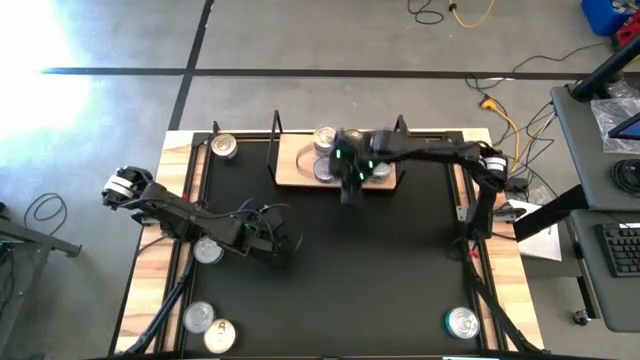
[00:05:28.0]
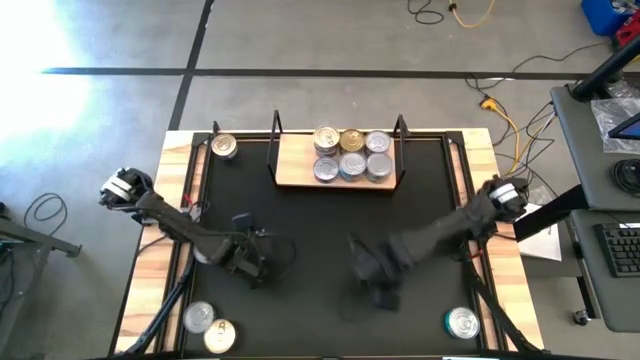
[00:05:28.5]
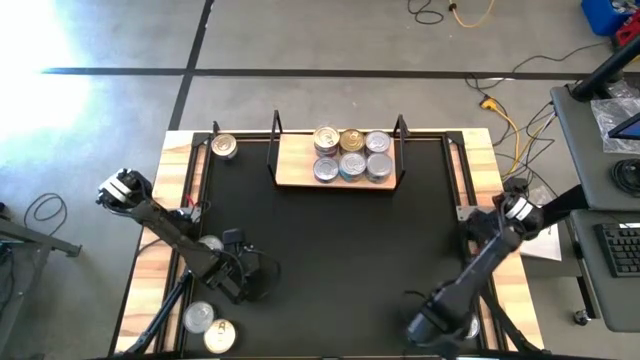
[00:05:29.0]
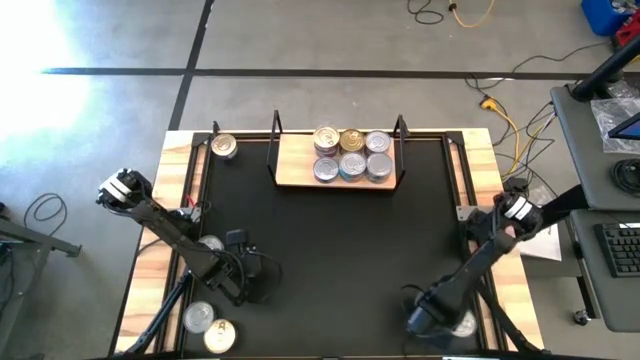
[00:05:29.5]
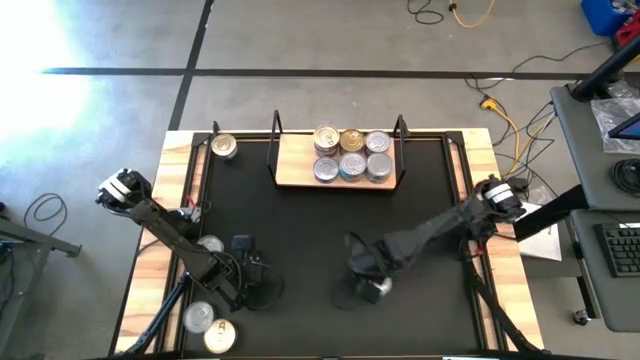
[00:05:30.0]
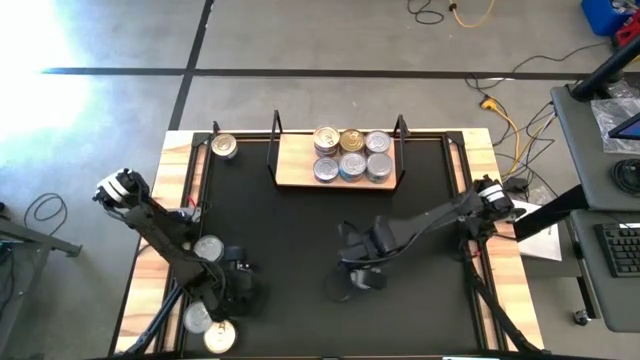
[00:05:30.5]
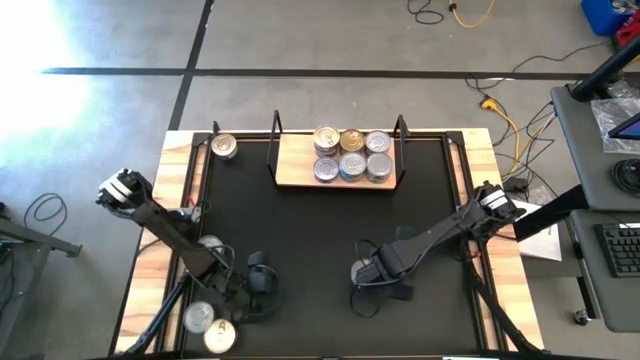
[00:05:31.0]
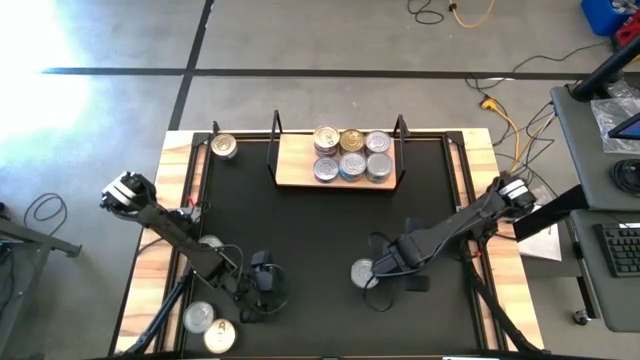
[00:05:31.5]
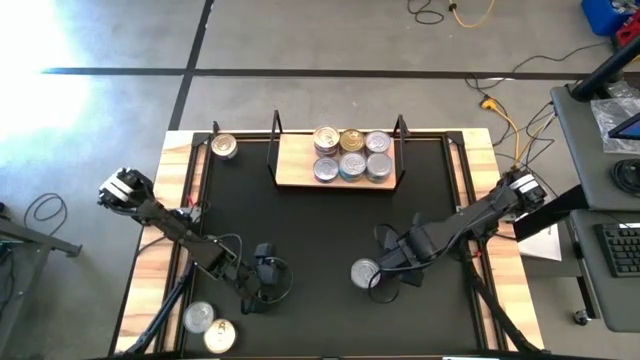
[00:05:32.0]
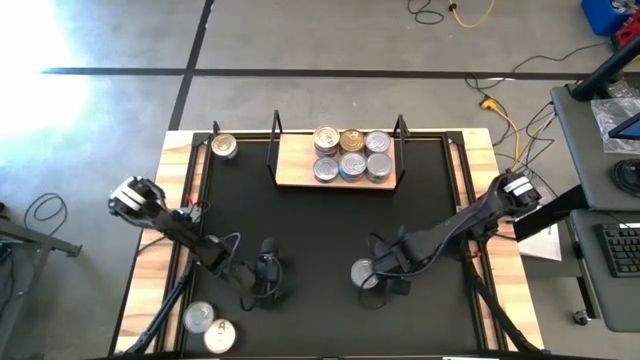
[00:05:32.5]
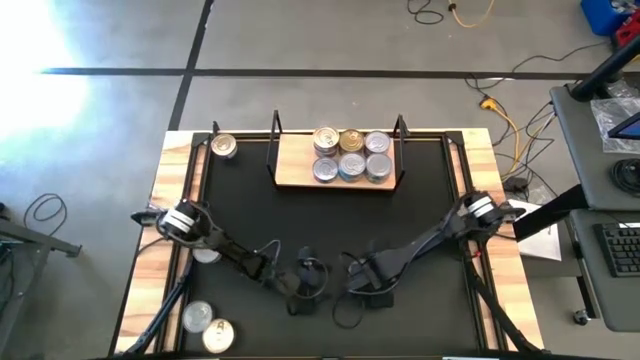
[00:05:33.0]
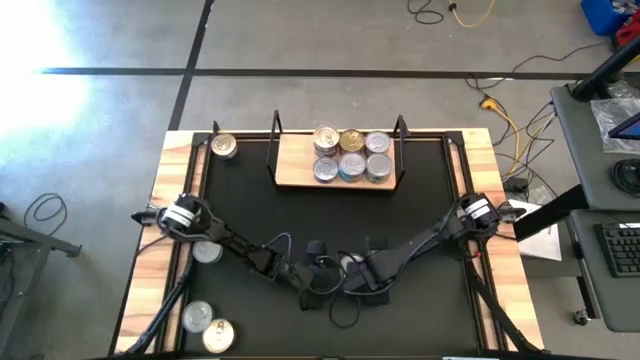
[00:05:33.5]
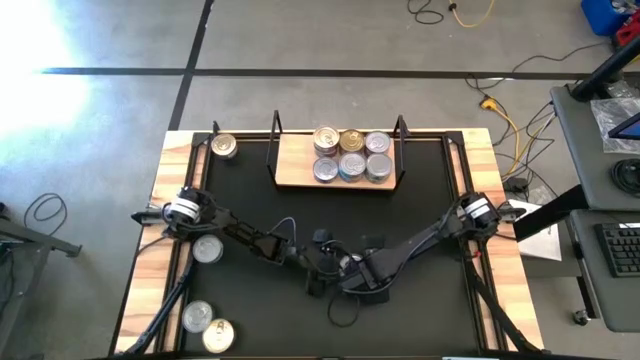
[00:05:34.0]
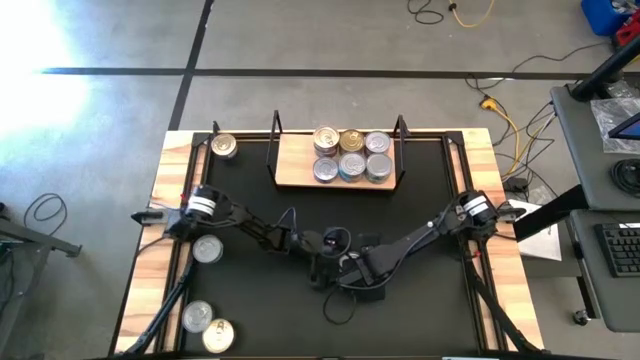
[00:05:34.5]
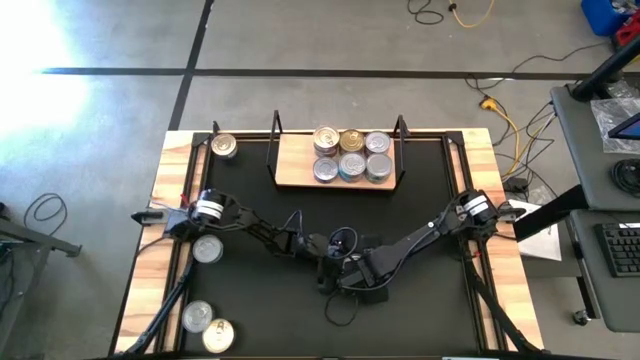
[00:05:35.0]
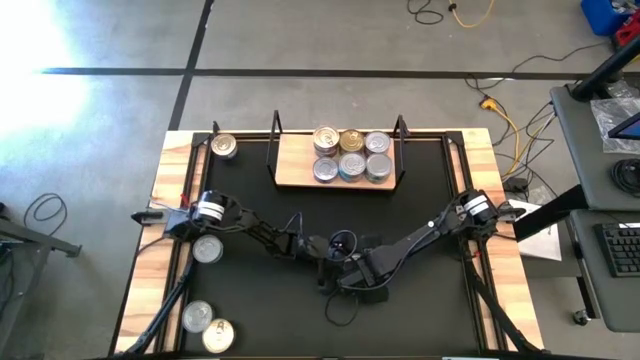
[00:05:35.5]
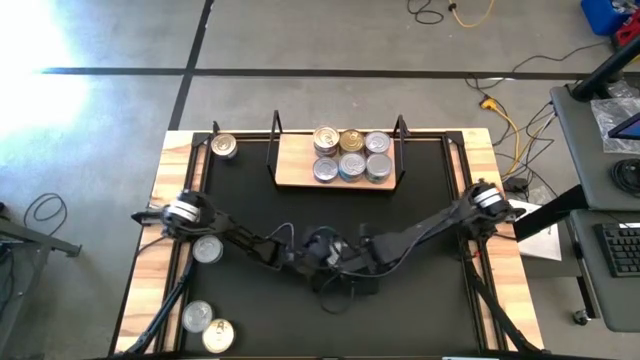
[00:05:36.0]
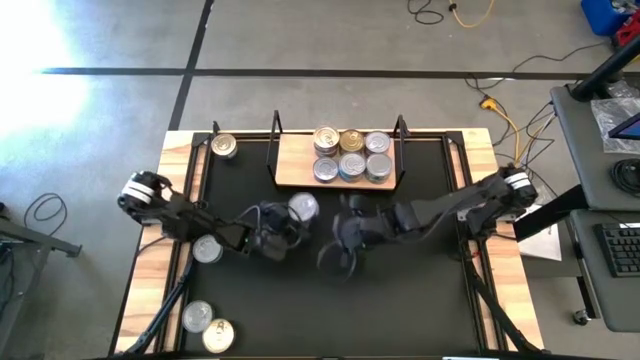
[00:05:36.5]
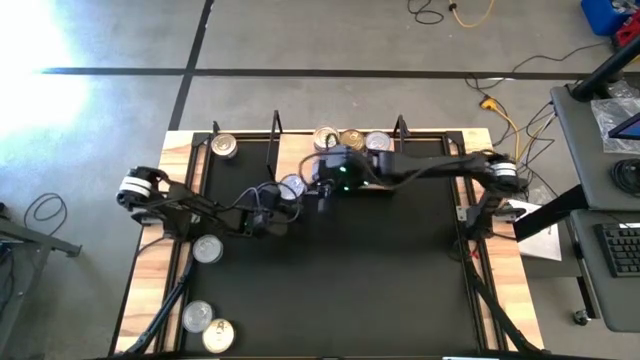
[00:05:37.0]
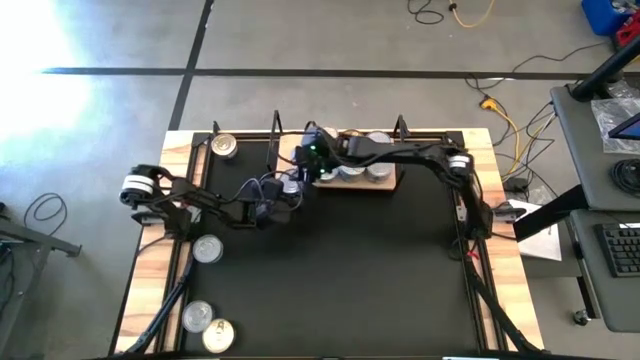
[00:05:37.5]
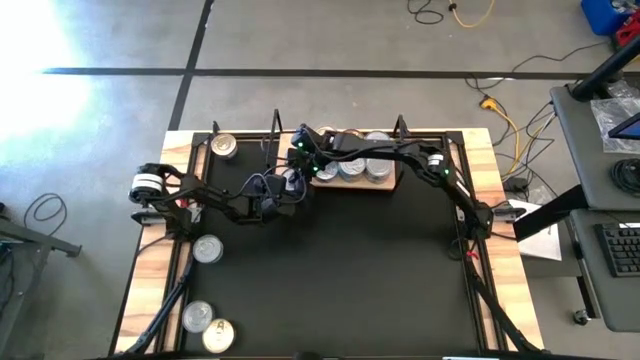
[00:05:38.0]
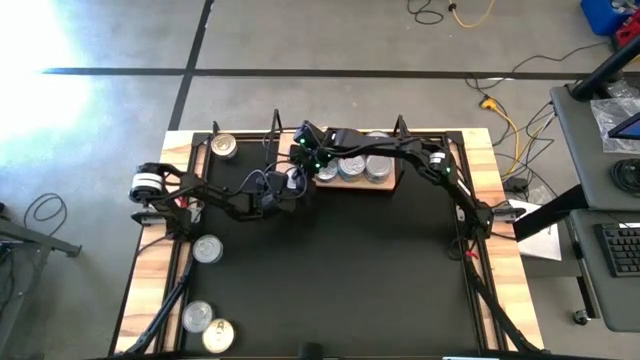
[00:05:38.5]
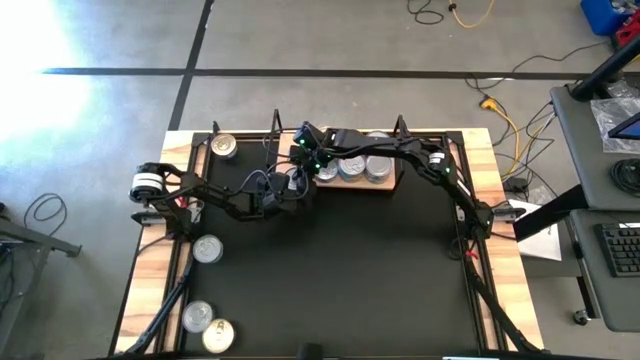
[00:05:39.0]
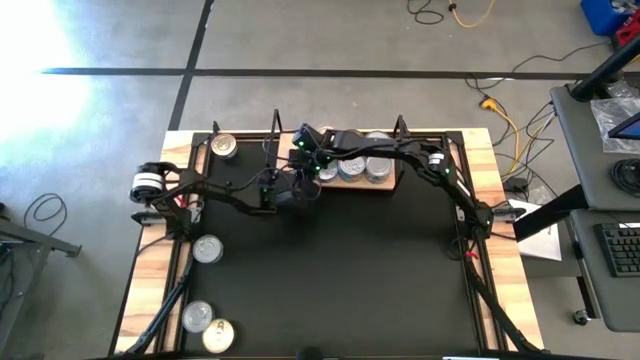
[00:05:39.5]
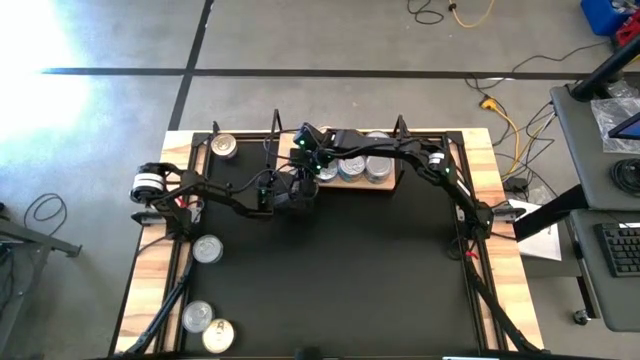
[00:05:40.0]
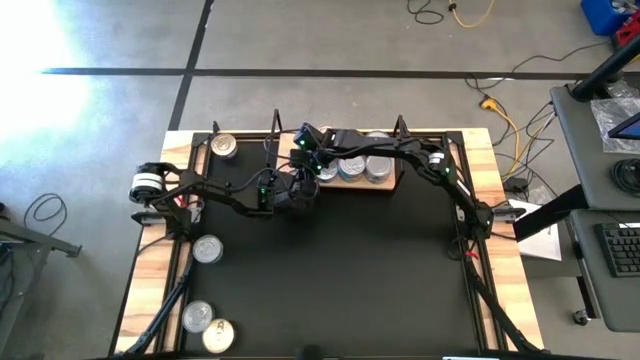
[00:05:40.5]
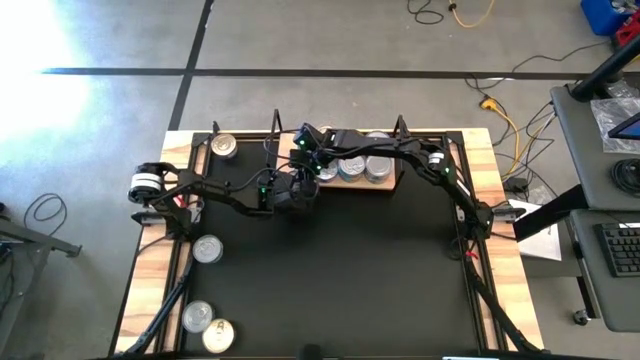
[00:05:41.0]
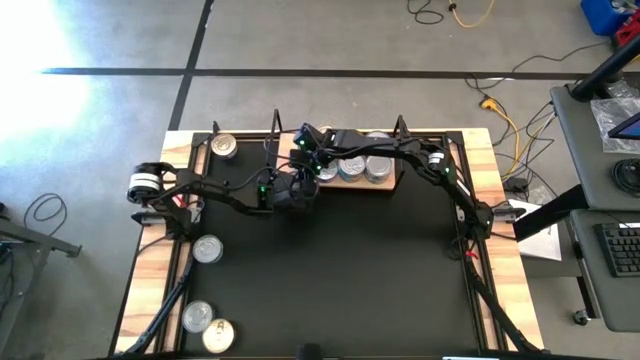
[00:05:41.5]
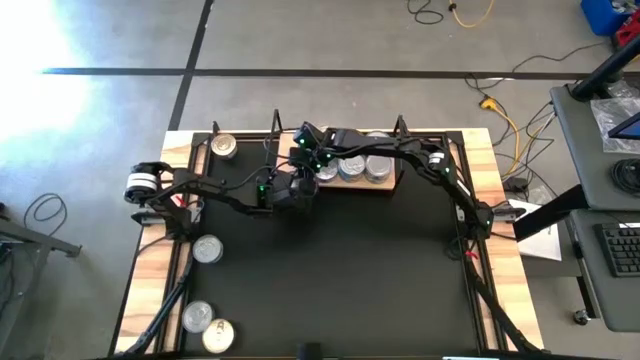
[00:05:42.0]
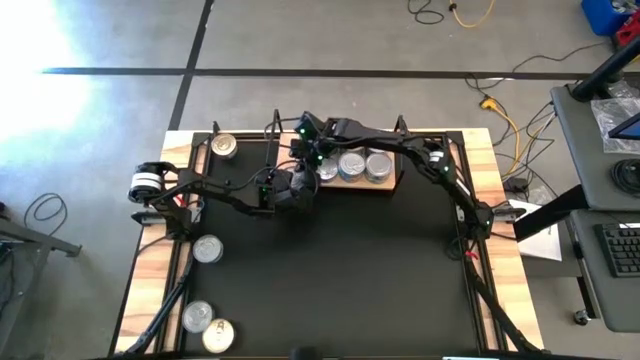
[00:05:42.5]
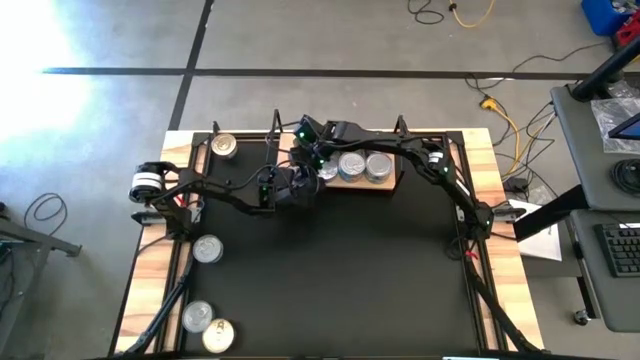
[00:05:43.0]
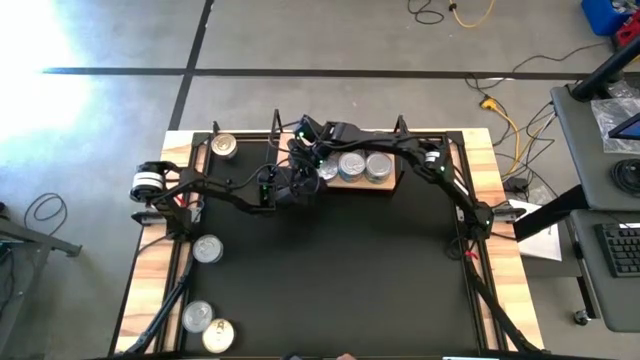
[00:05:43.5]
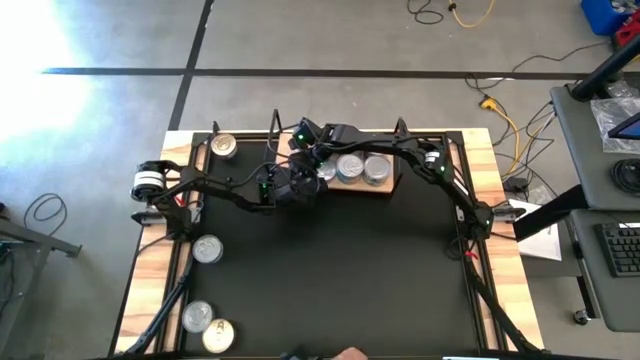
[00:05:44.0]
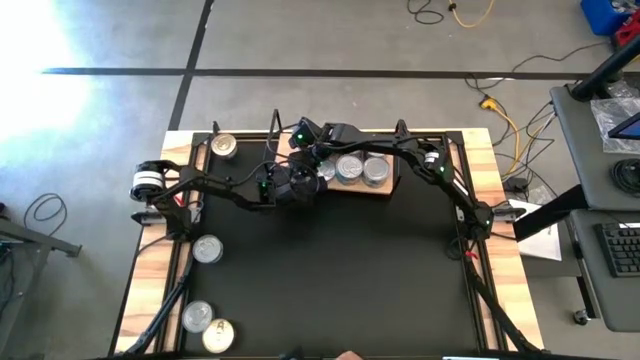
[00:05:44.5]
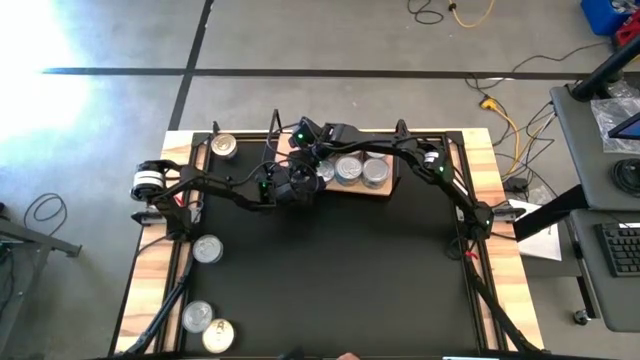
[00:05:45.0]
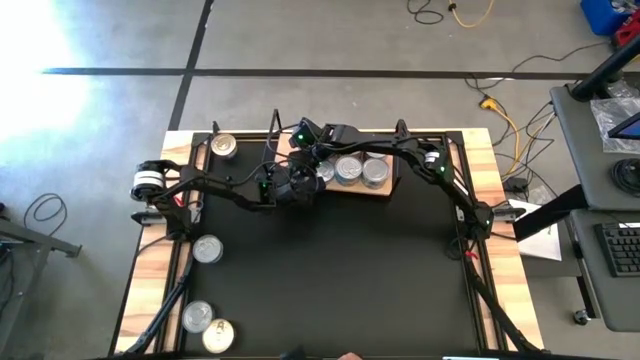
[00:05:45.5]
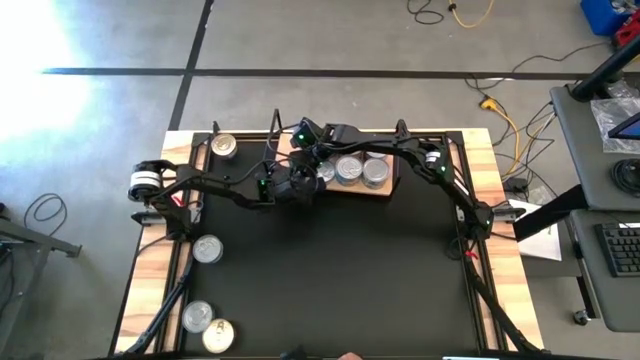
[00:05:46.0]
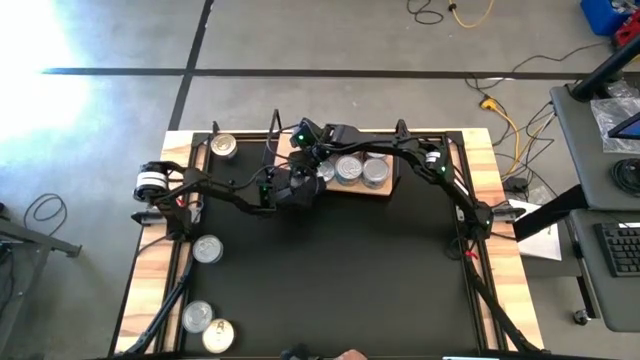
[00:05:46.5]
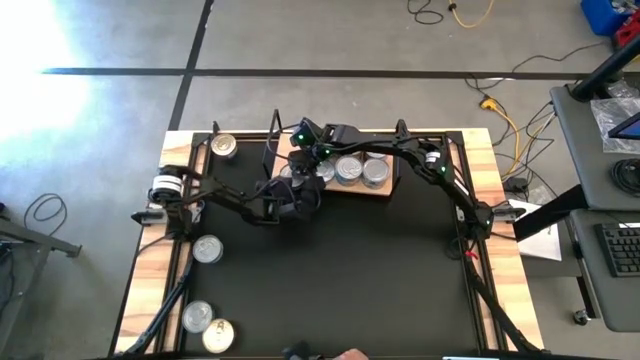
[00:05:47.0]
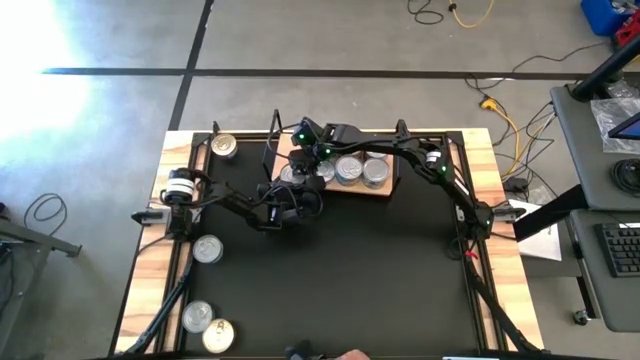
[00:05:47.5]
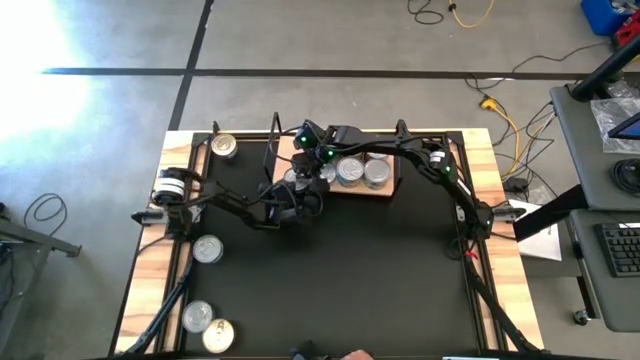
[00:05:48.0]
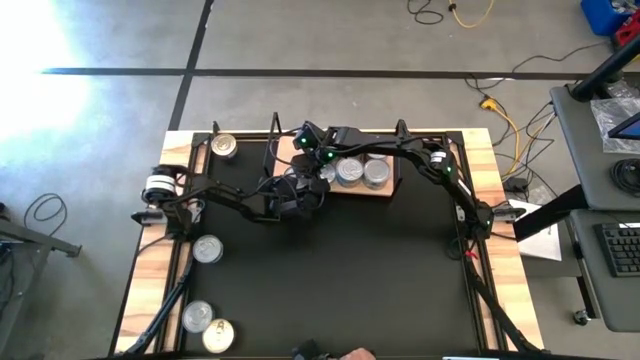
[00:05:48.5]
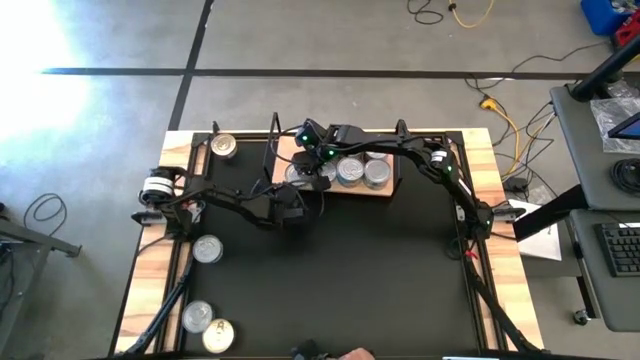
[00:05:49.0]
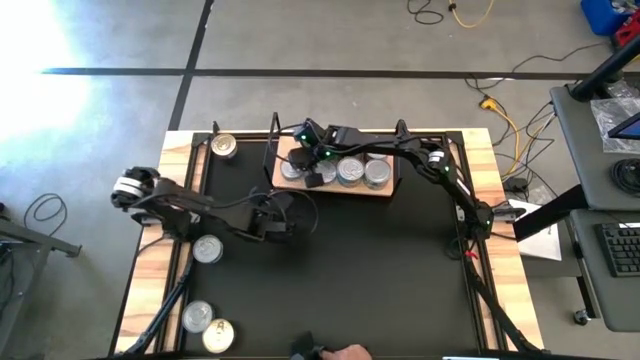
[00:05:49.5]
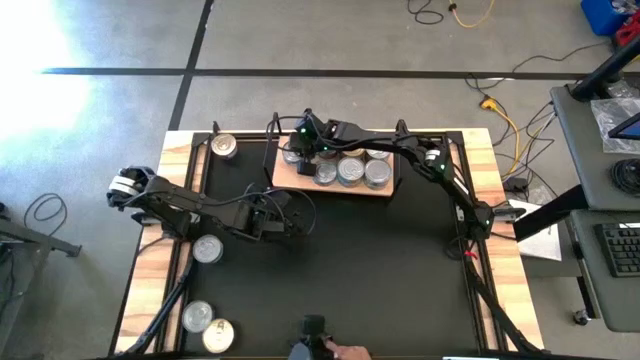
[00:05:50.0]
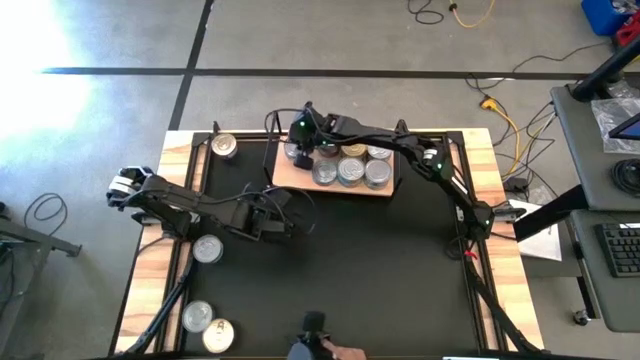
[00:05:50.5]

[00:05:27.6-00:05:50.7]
Task: Stack canned seafood by type on shelf
Put the green-blue tuna can on the shelf
